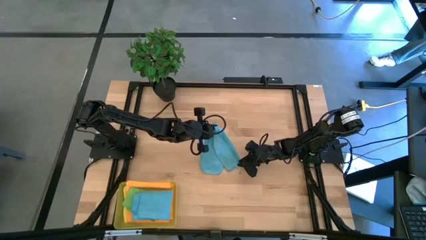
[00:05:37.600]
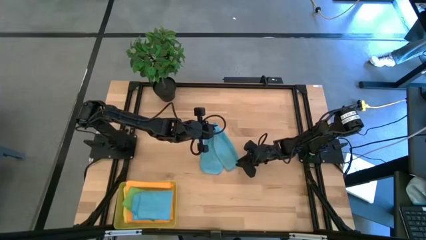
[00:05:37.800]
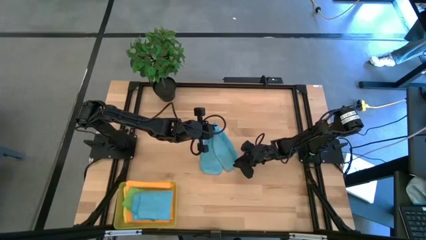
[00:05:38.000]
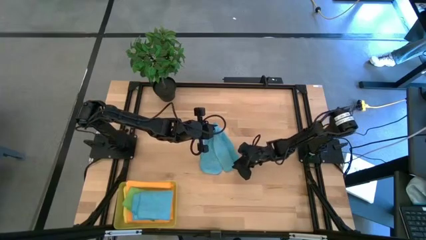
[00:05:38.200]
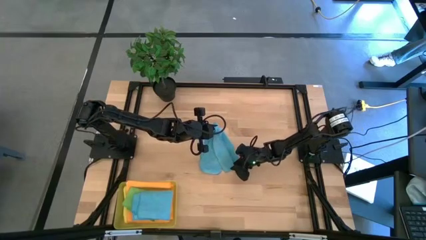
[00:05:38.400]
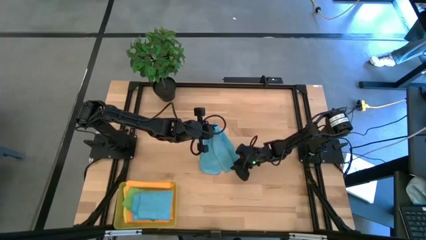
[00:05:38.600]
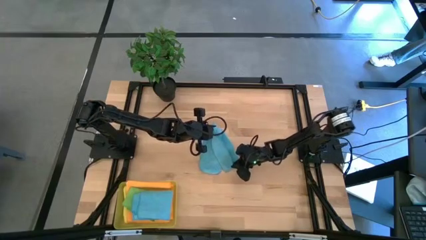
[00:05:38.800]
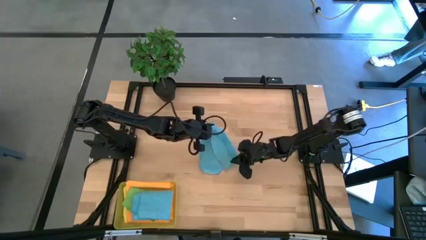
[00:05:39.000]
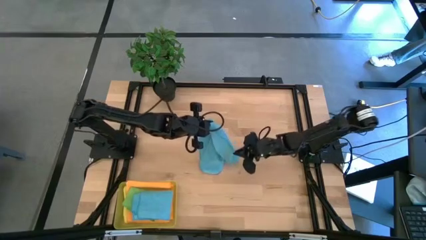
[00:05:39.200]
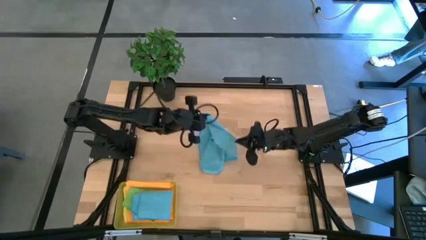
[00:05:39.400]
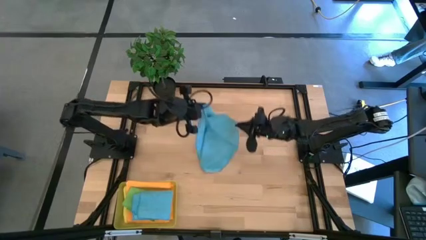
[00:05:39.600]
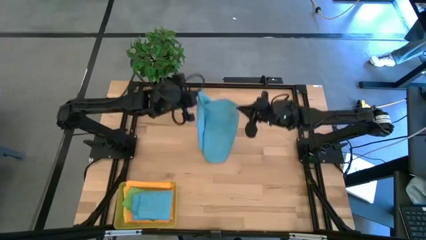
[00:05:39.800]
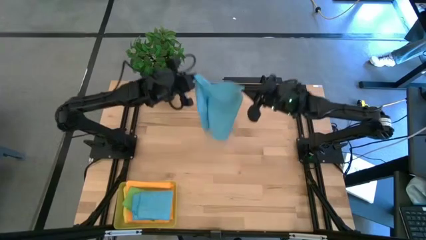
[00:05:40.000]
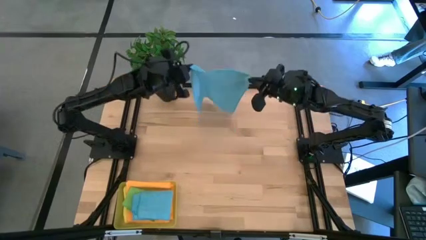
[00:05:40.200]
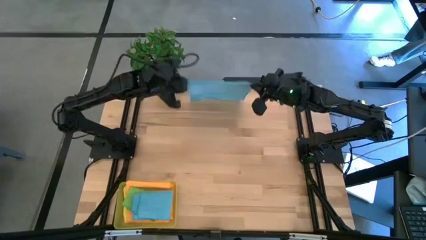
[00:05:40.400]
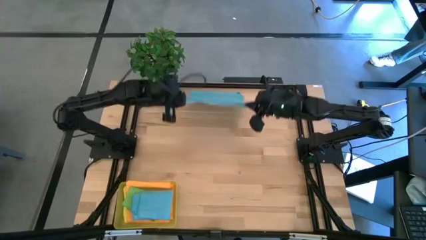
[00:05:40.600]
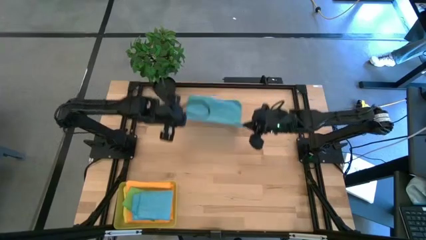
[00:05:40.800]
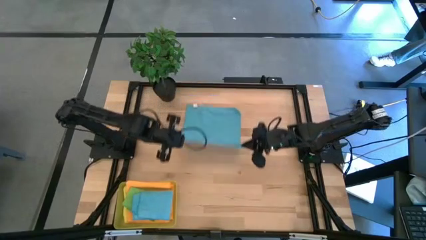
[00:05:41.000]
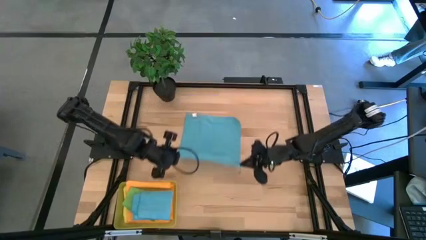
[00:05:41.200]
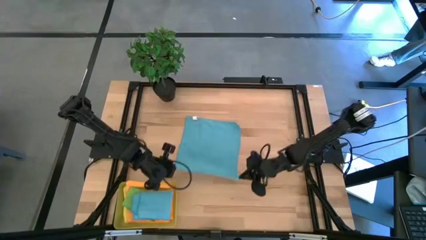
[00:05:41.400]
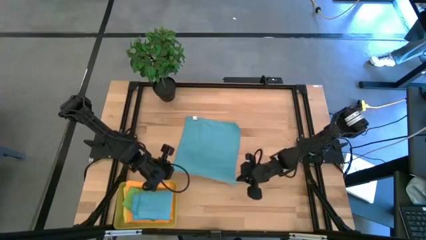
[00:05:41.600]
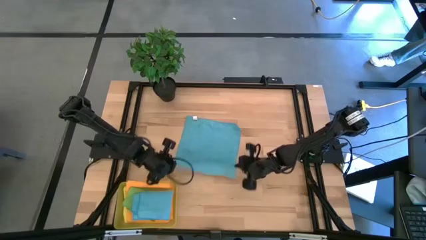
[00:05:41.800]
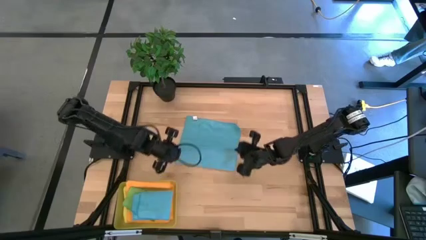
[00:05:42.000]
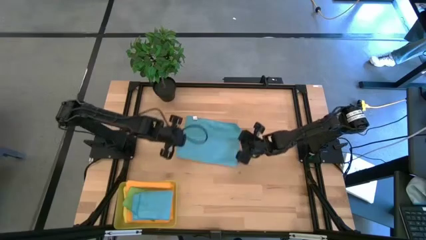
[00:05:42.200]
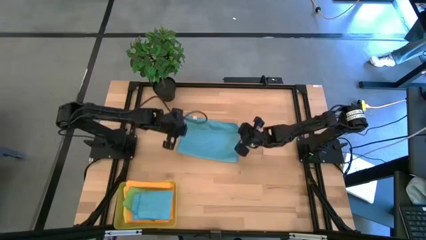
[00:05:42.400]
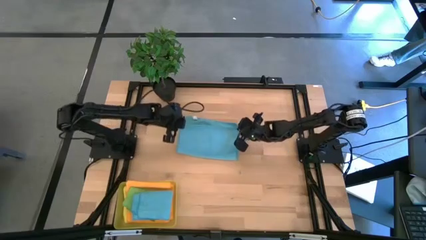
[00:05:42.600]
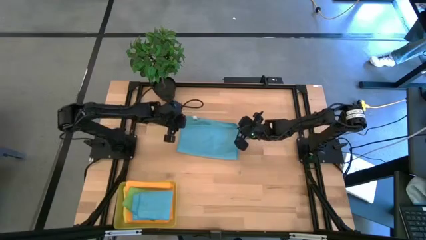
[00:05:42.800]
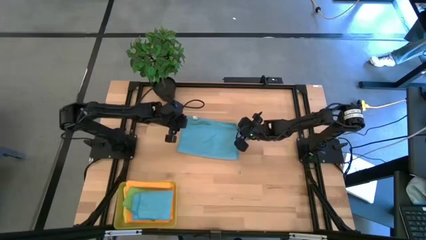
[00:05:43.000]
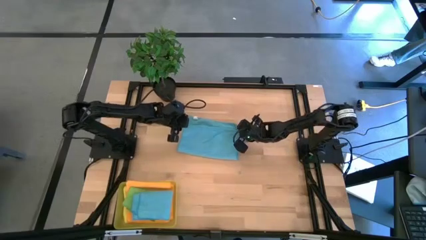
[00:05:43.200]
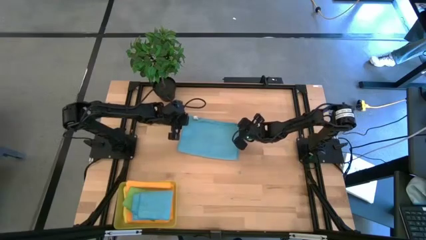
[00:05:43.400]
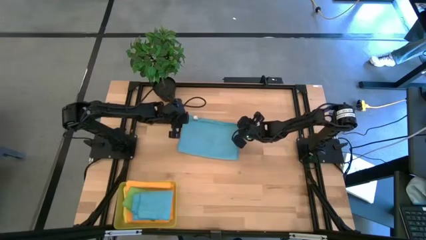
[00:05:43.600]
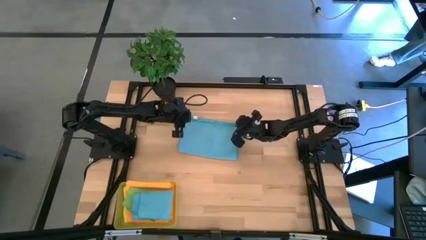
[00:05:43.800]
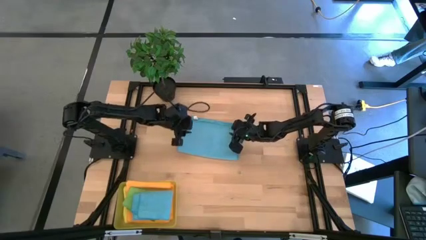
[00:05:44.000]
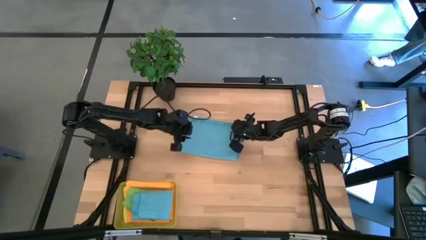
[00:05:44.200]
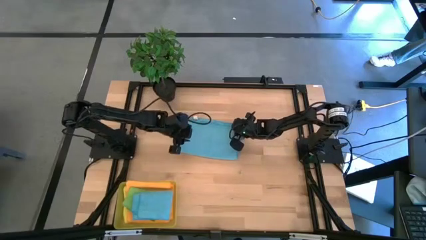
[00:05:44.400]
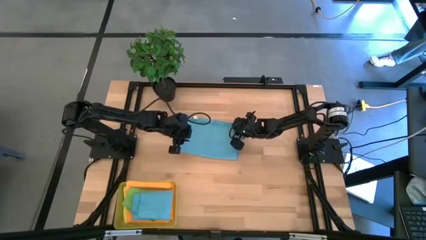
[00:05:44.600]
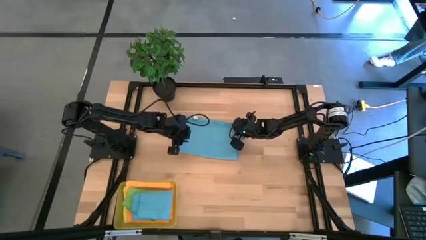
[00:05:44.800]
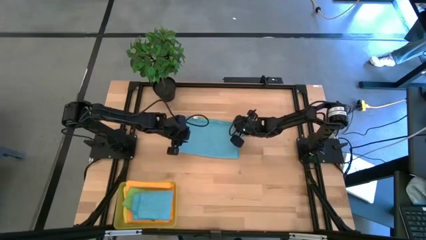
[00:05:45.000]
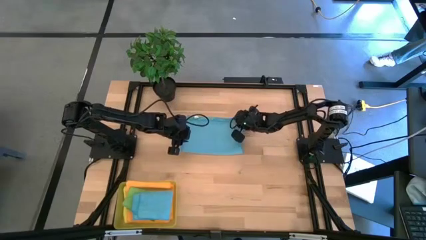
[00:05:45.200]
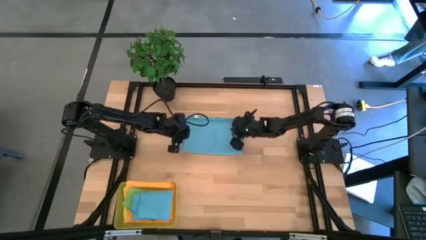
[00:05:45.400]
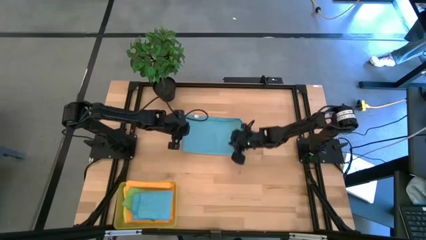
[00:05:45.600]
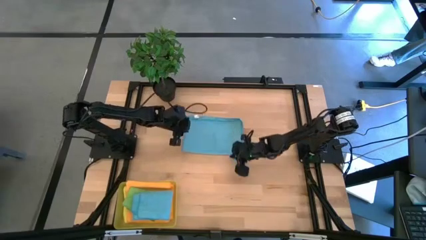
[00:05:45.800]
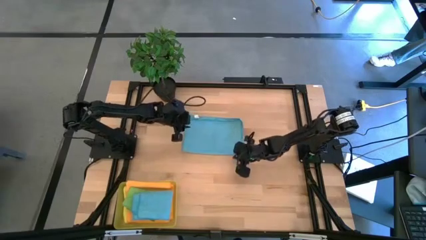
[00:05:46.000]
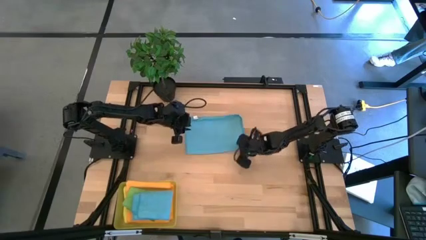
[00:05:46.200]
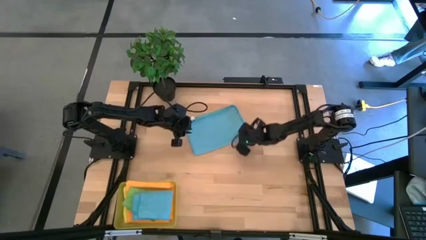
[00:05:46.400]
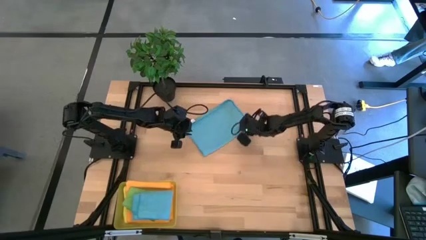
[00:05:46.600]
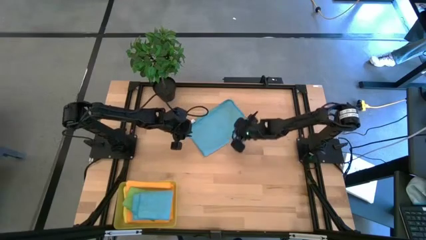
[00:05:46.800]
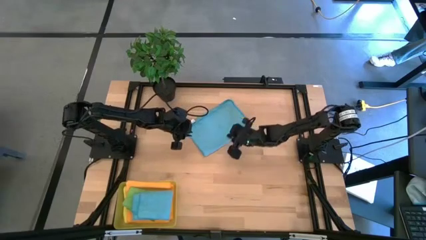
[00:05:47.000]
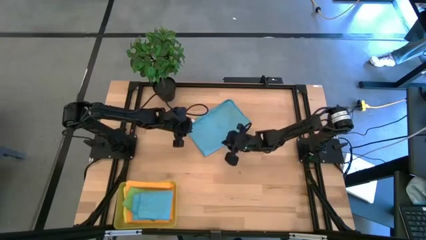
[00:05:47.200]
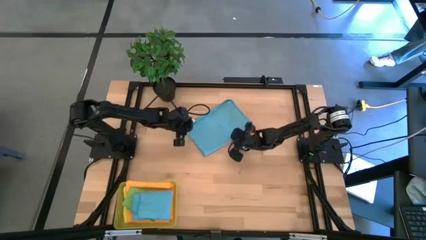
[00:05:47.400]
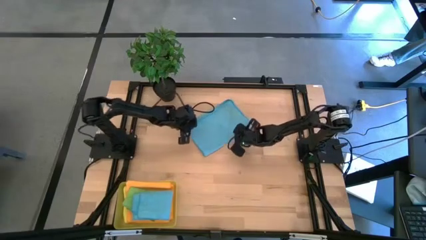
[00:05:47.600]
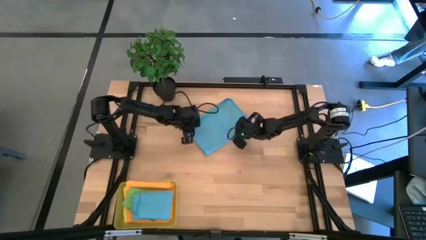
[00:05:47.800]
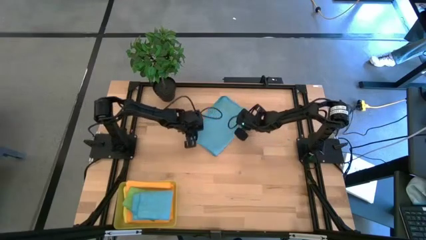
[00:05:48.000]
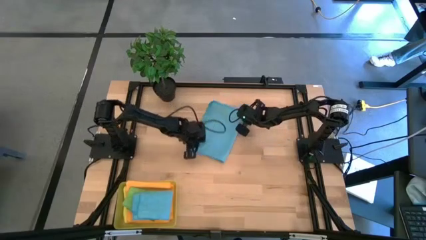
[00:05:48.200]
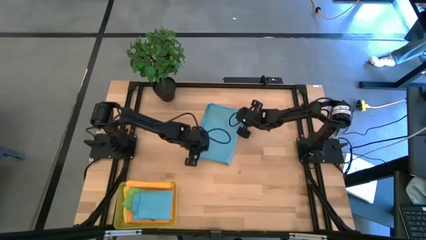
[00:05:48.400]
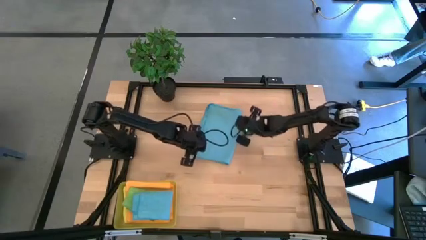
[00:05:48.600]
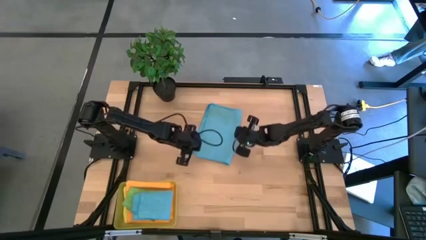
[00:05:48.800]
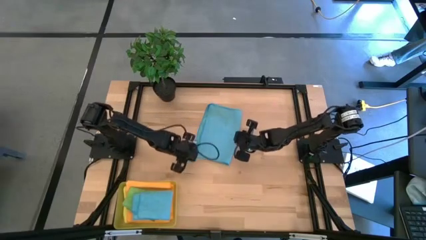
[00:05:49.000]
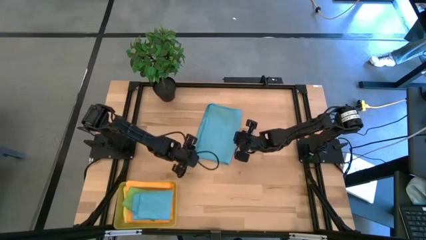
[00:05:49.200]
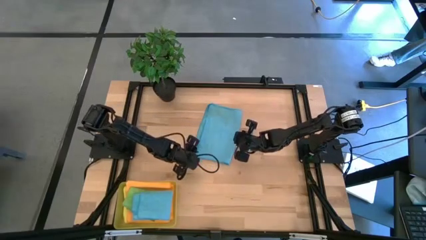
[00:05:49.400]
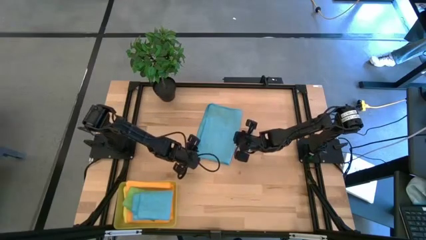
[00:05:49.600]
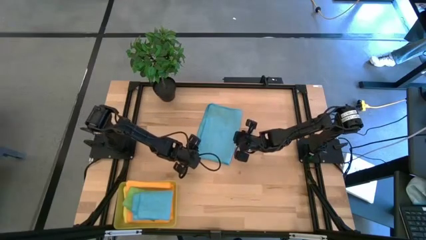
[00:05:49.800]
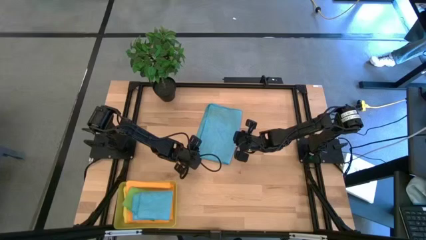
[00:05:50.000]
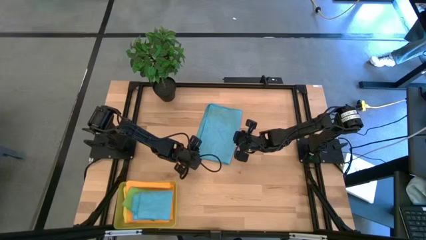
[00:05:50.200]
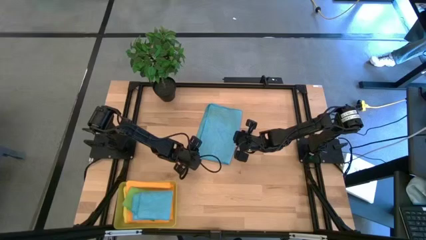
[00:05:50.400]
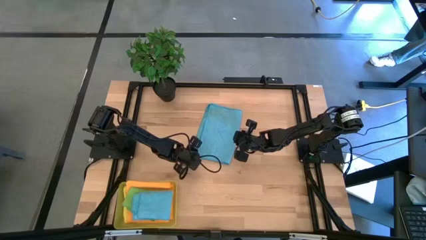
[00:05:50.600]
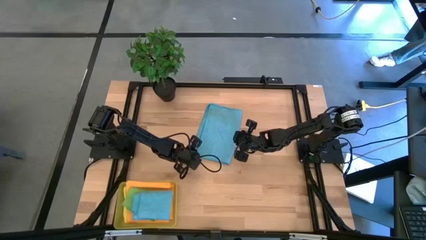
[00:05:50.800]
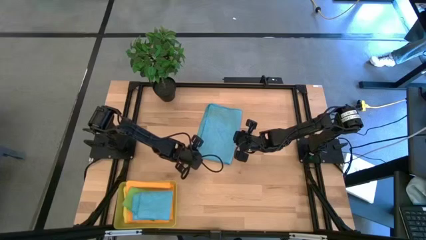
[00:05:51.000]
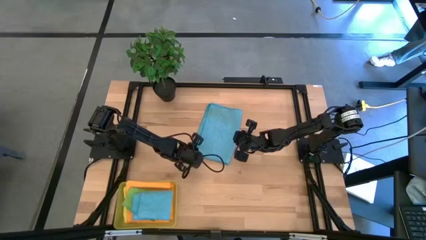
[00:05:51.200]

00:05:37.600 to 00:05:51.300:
Task: Fold microfiber towels
Fold the blue microfiber cloth
